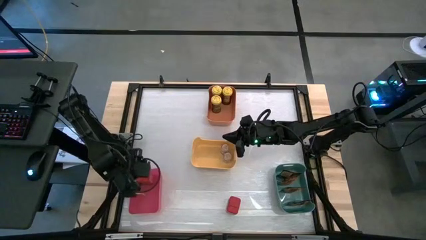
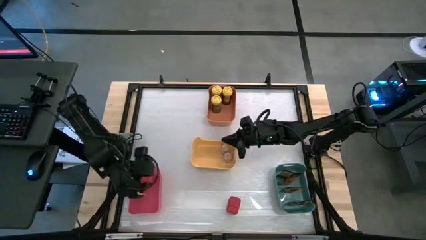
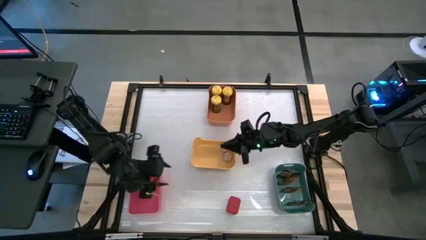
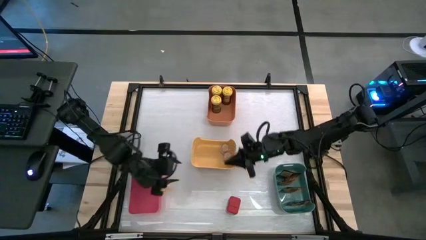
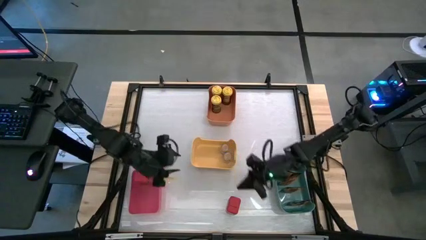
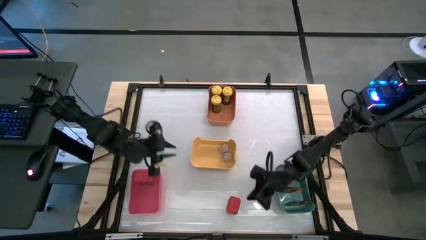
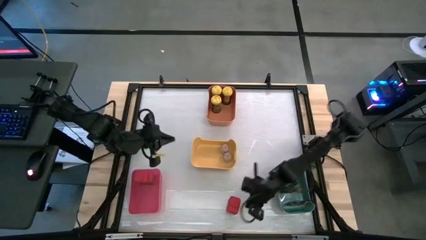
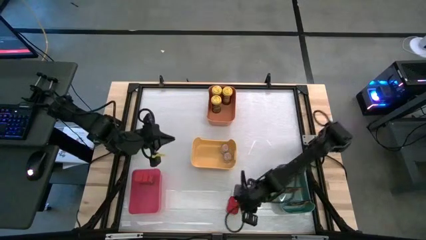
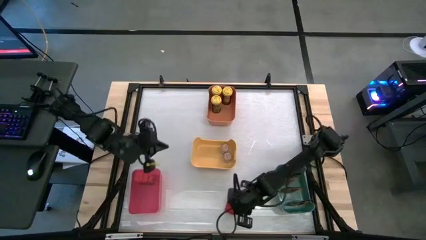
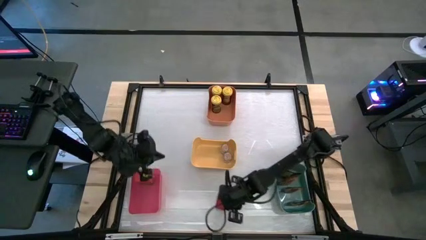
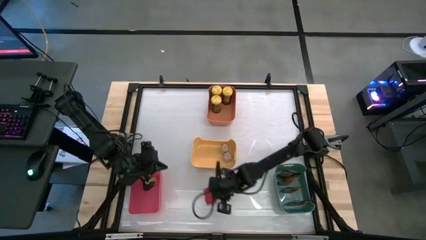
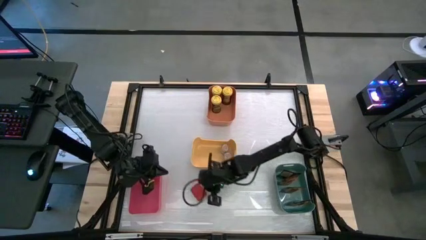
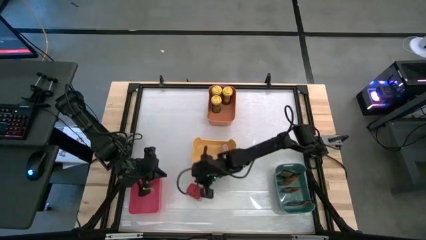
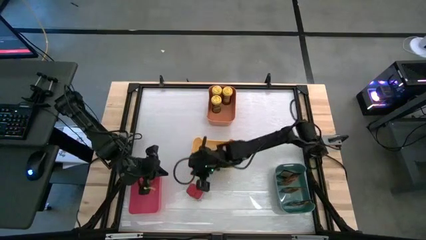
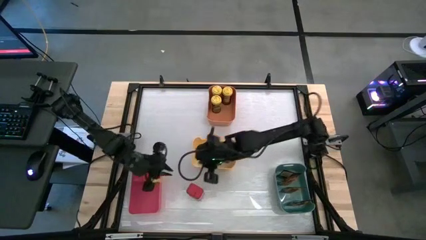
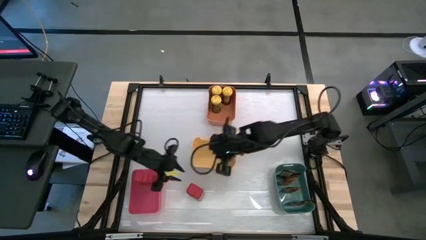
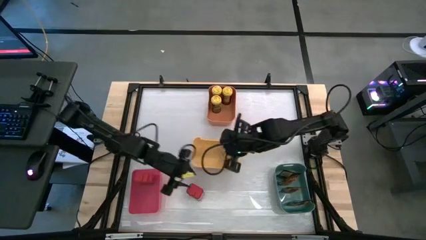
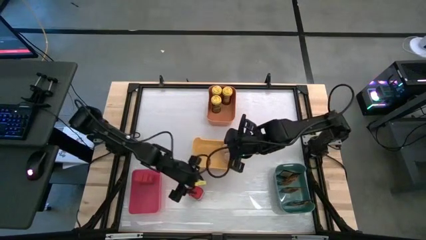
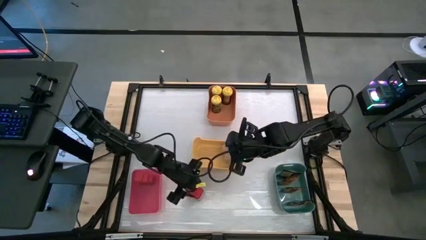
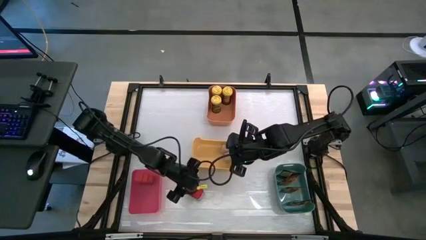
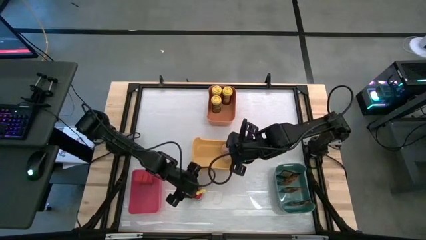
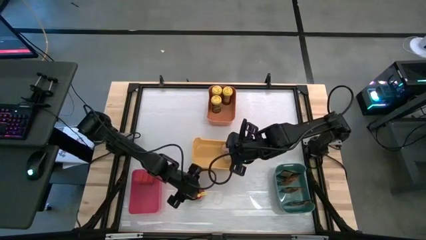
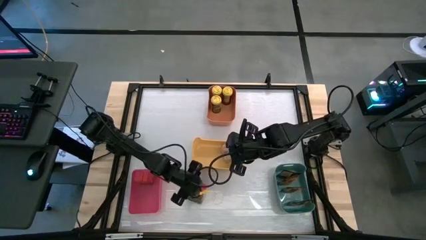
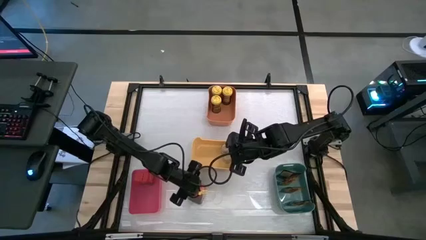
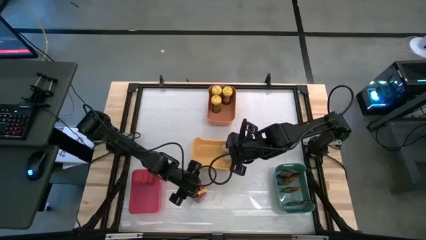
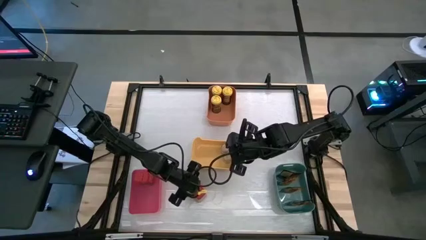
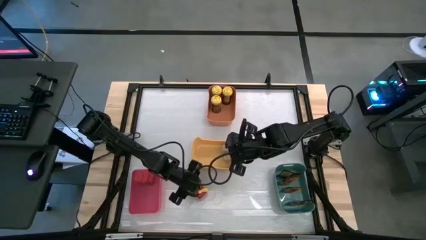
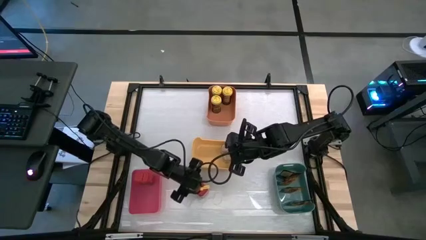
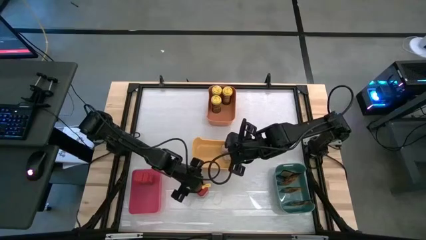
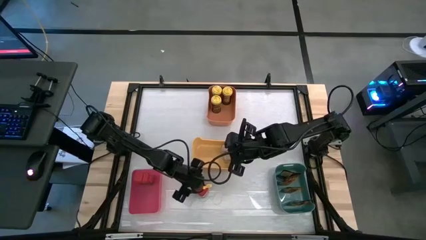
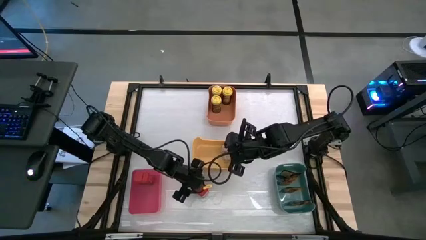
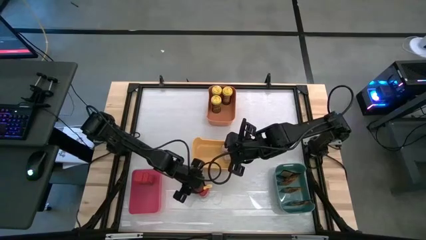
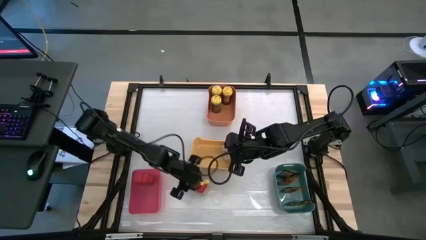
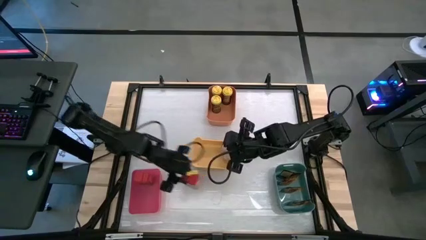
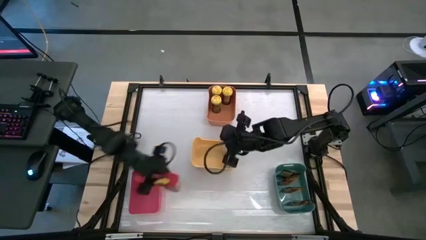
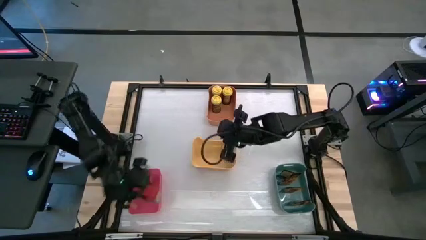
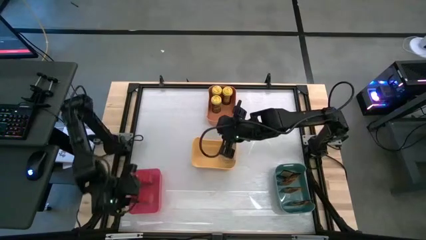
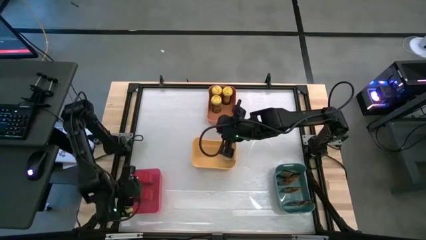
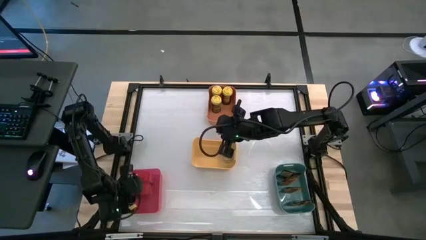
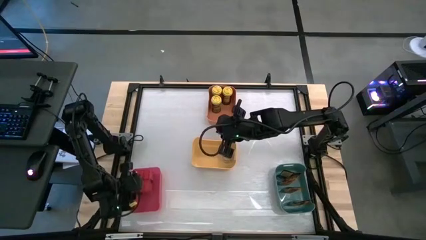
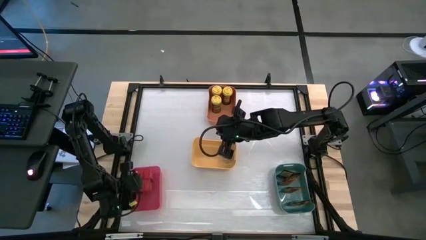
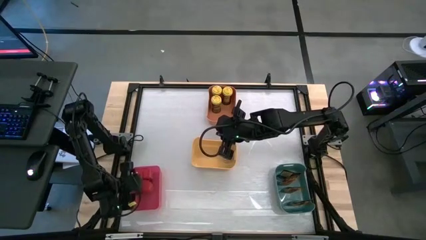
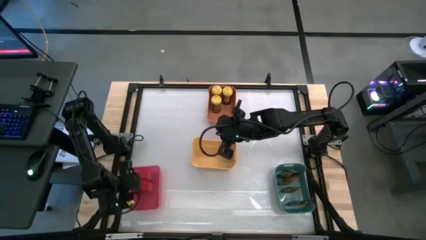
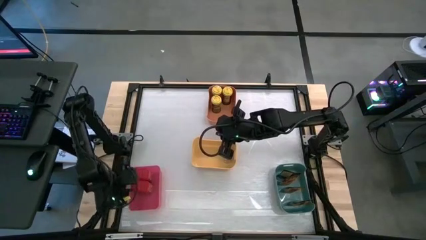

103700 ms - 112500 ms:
Task: Sort spices by type
Put the red seasoning can into the red bin

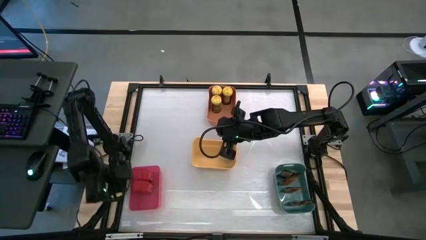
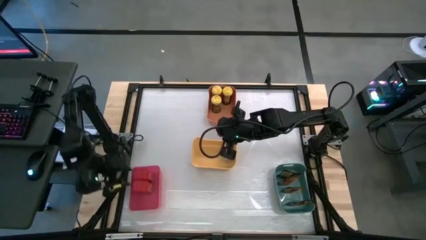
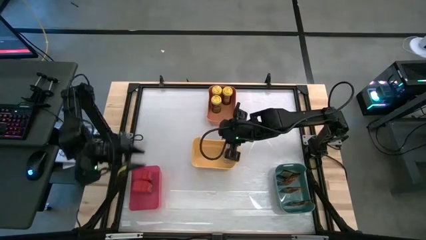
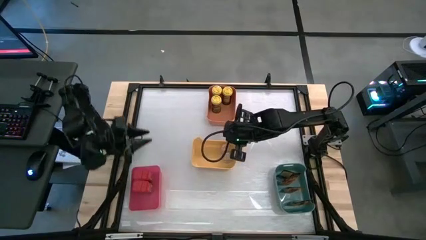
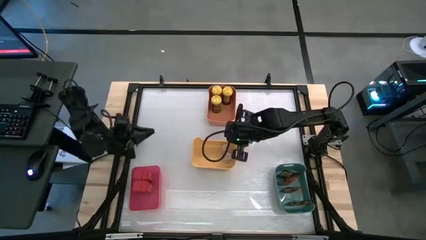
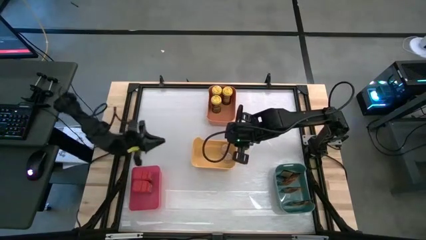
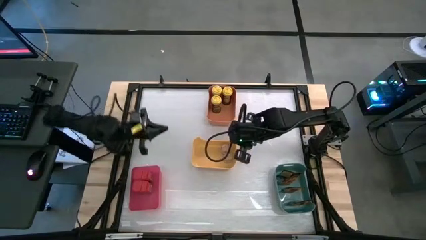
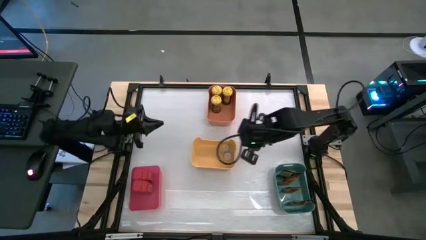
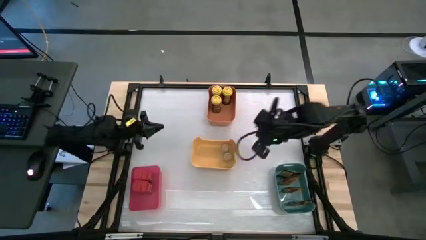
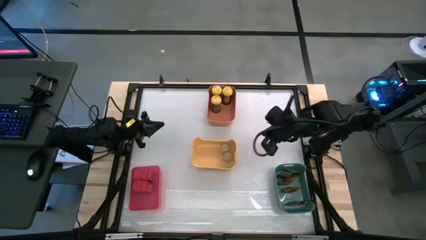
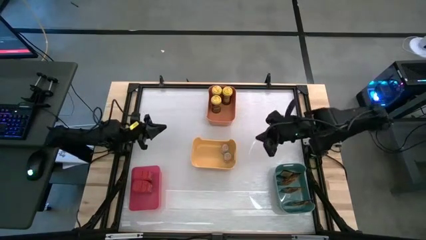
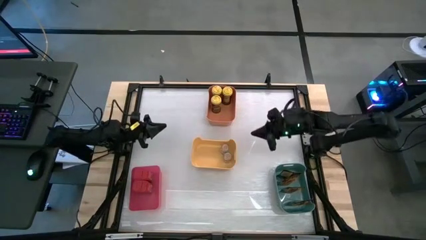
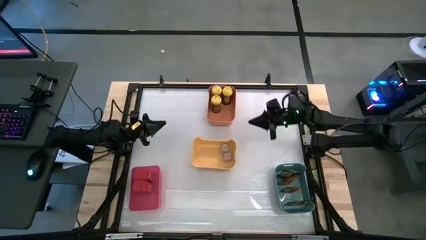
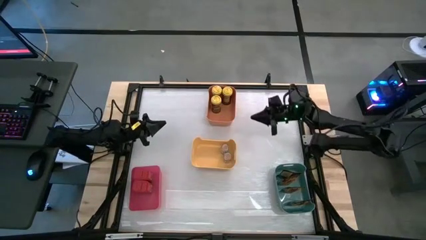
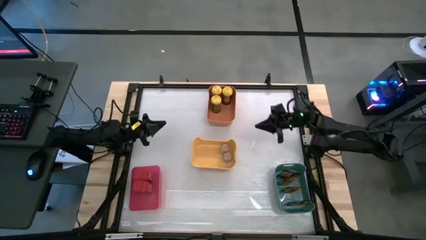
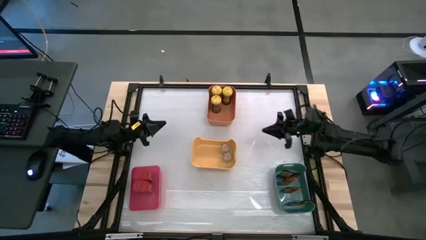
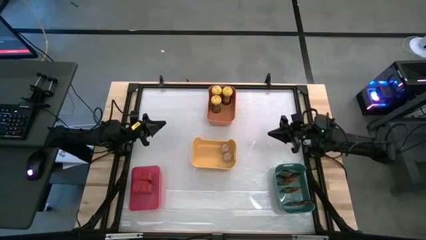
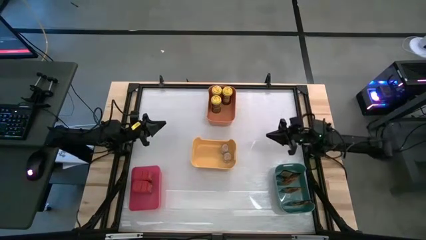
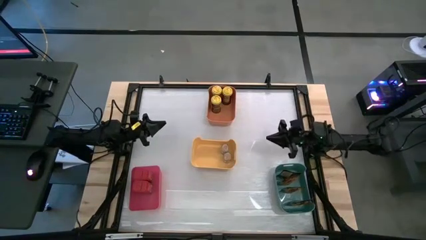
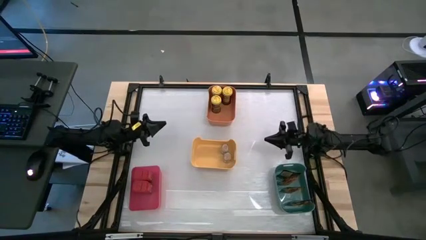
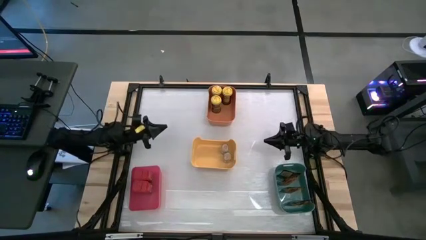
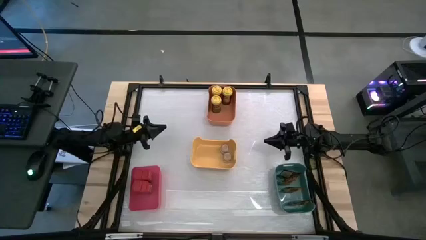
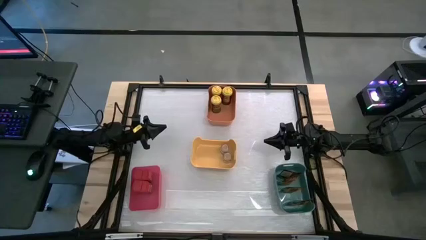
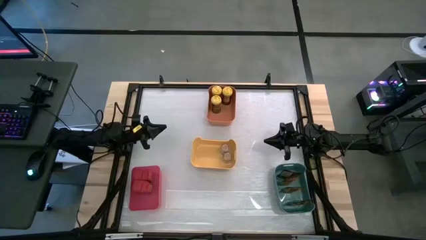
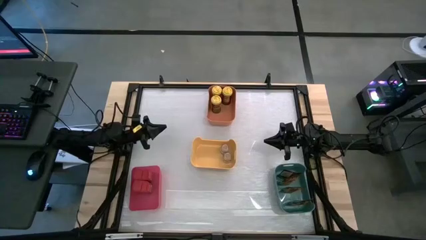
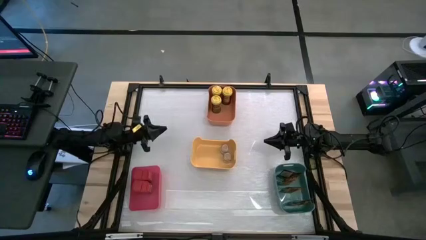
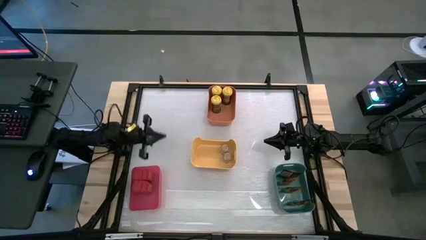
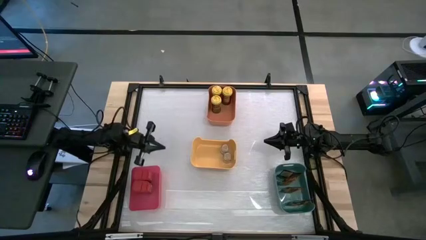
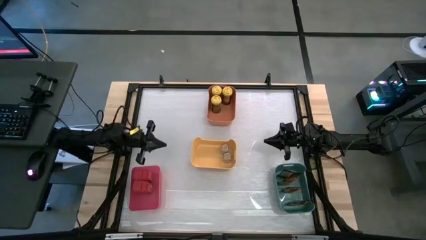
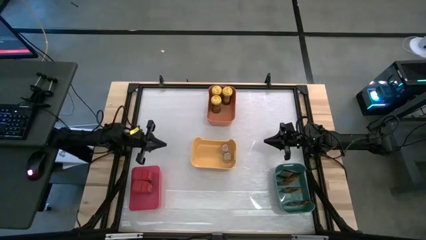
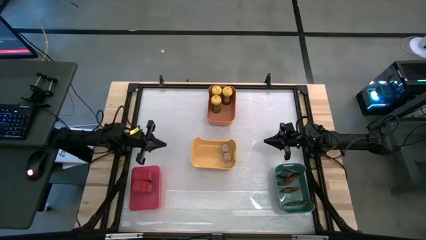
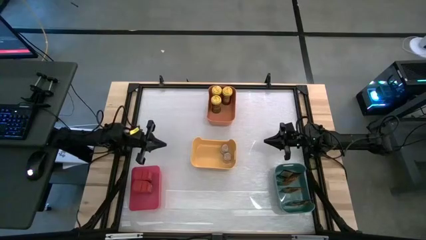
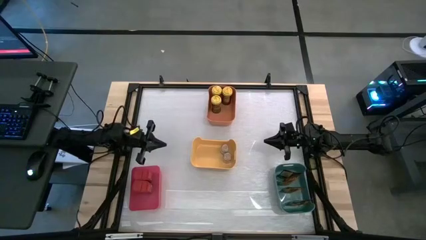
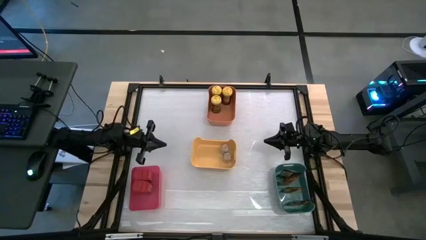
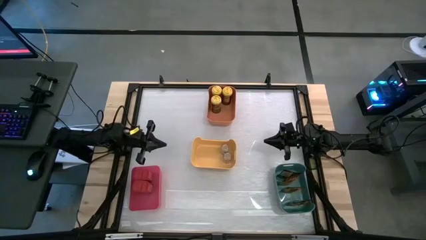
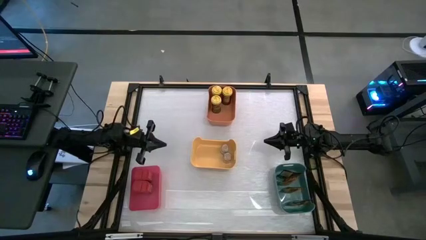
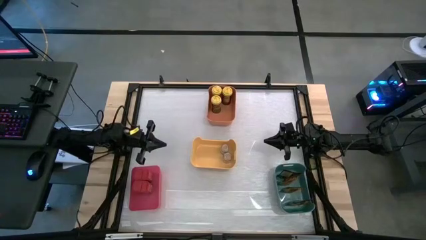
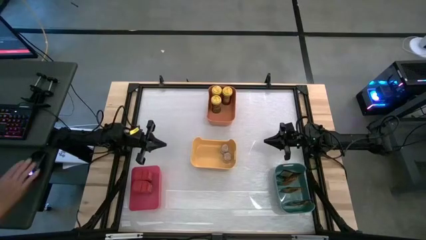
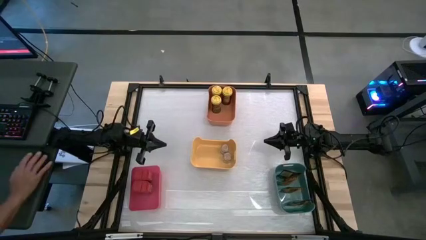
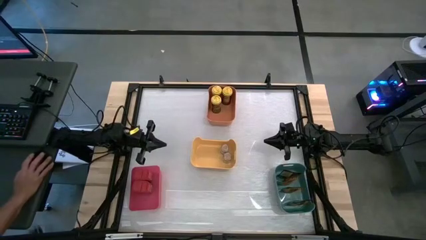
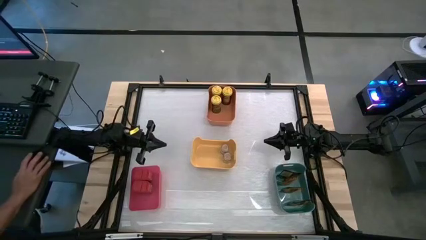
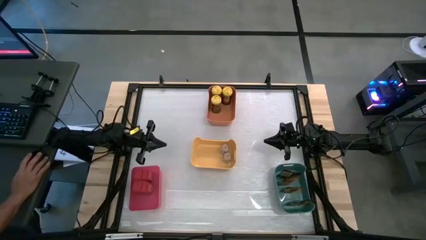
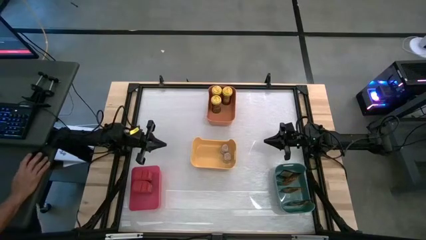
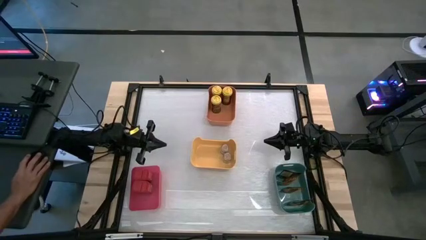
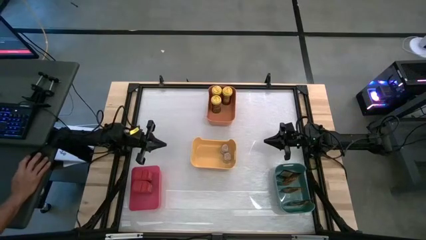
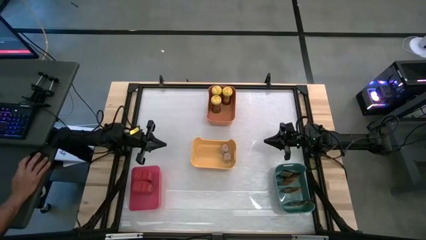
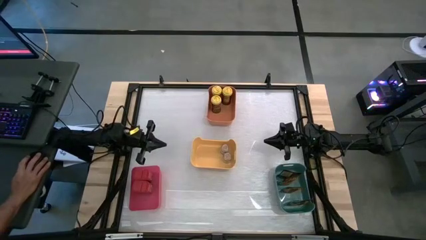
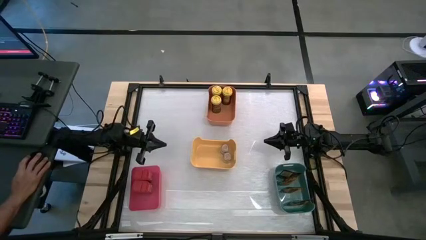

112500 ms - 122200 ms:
Return to Home Position
